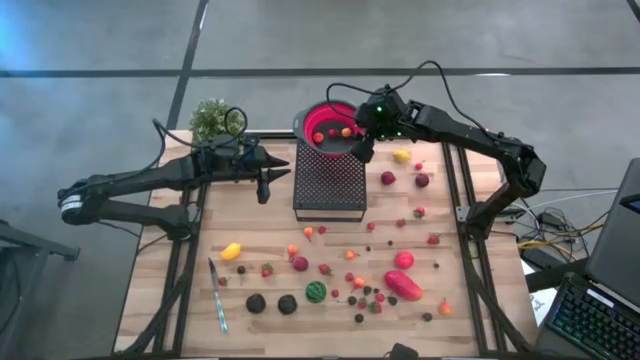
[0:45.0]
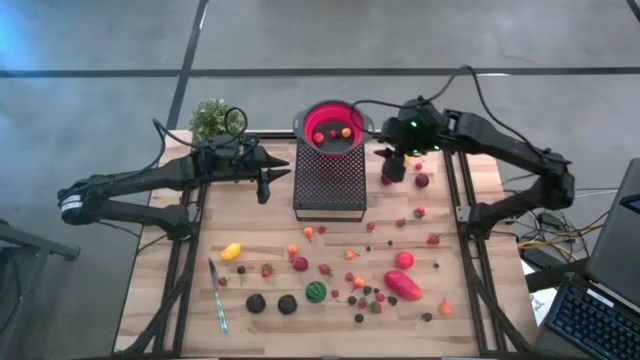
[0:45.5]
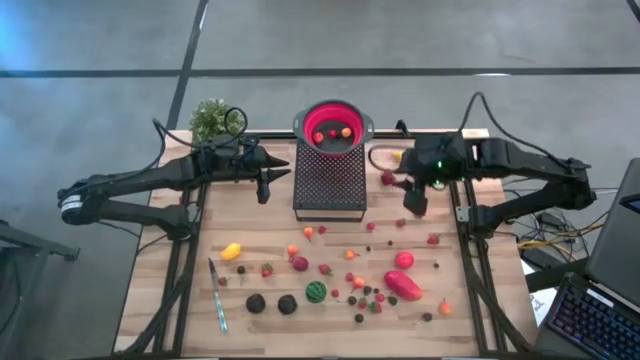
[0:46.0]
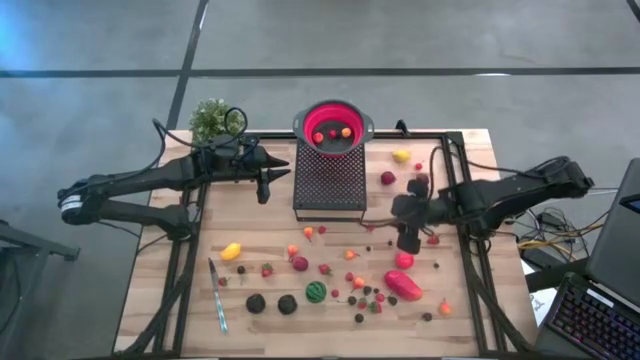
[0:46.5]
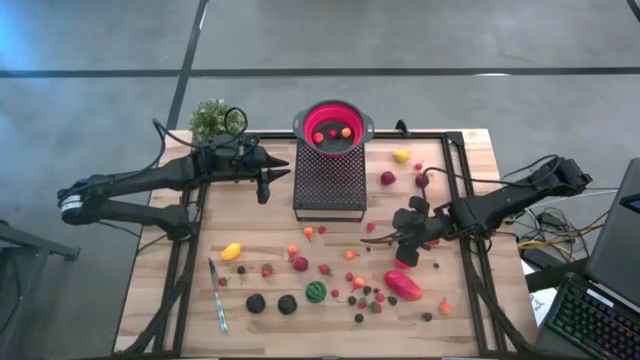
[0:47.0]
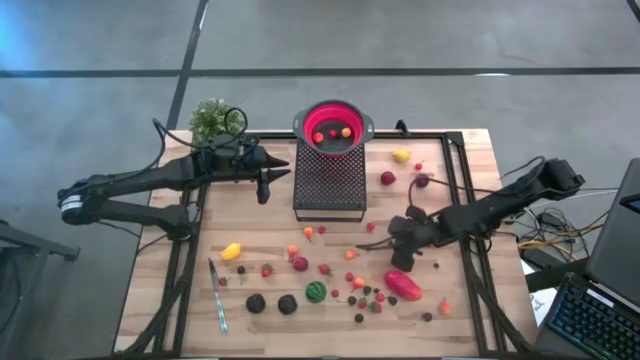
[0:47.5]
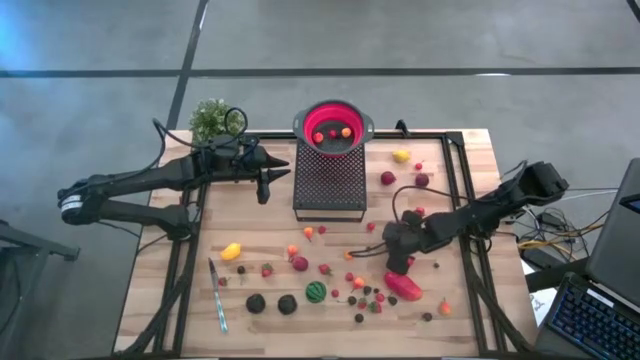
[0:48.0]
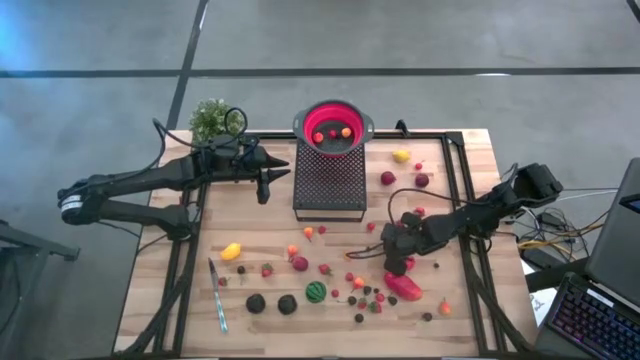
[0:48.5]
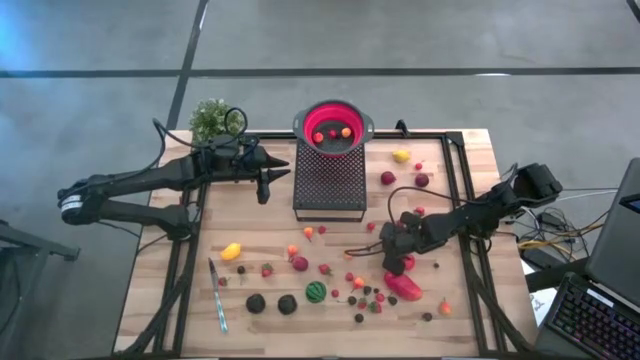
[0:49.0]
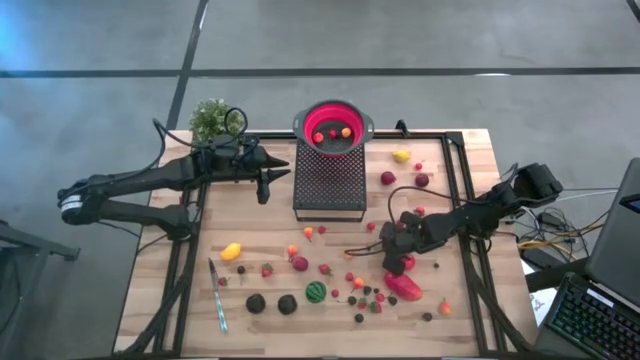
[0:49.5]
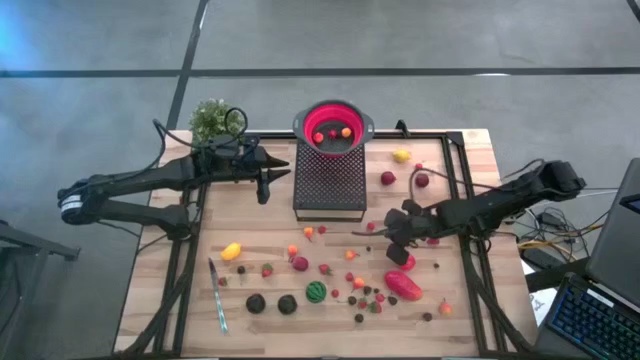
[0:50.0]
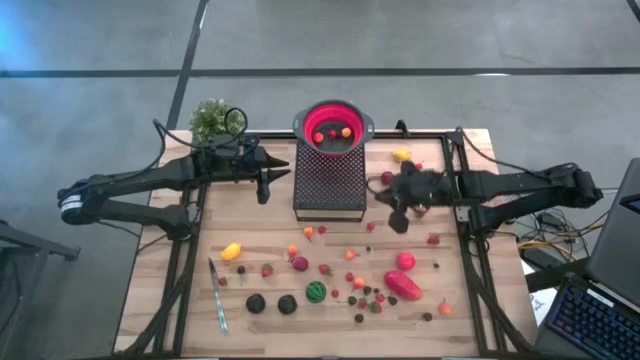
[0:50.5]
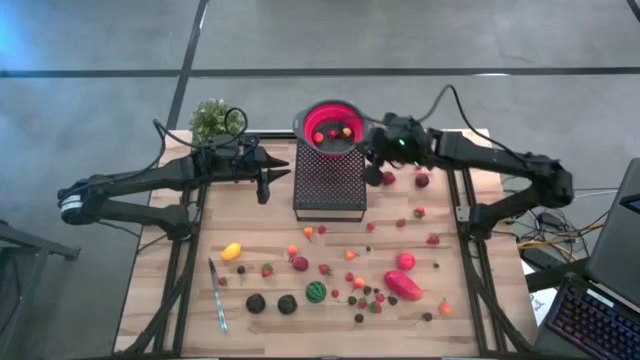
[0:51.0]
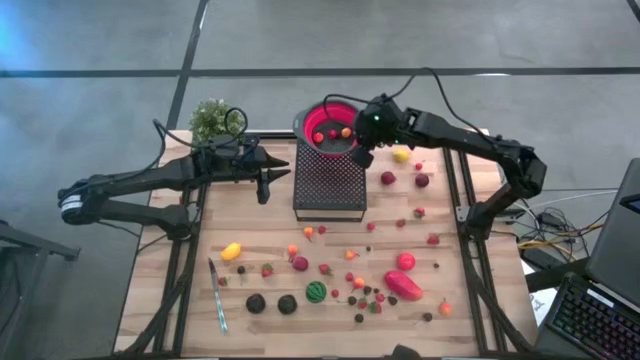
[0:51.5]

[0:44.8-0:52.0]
Task: Pick & Place Fruit
Put the blueberry into the red strainer bowl on the shelf

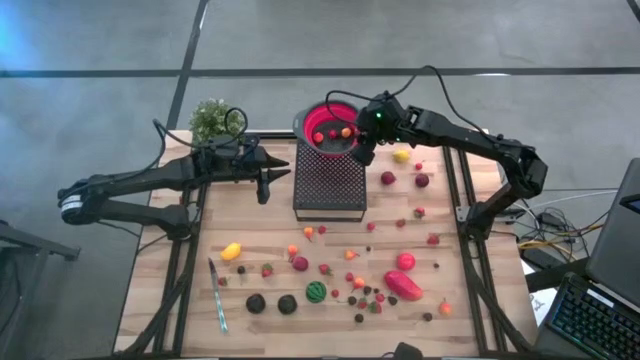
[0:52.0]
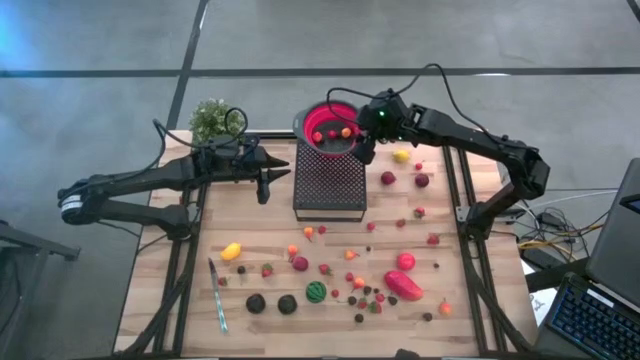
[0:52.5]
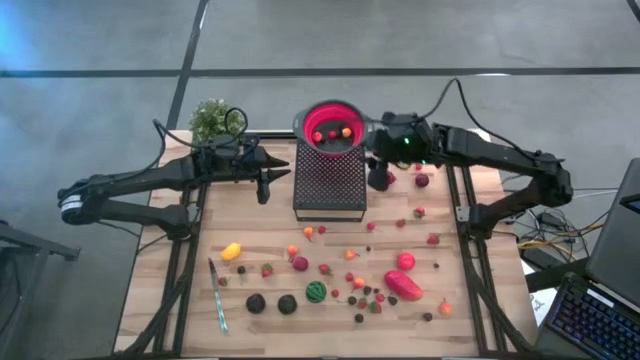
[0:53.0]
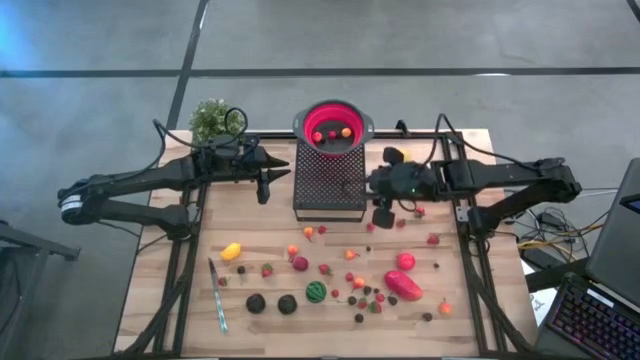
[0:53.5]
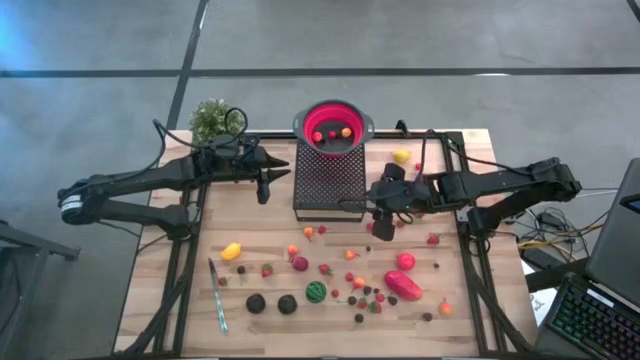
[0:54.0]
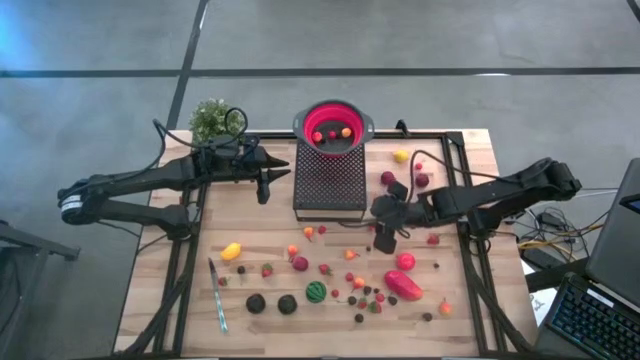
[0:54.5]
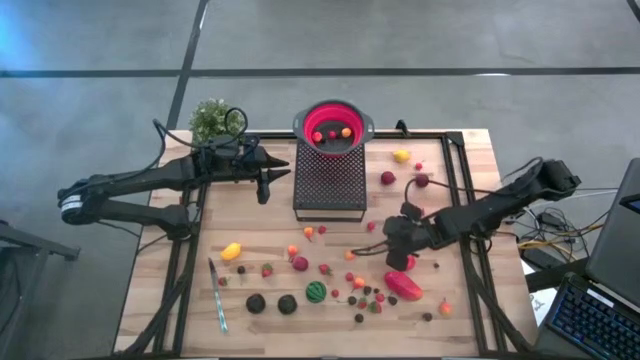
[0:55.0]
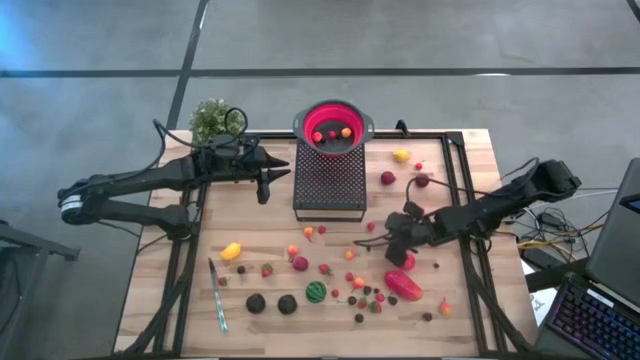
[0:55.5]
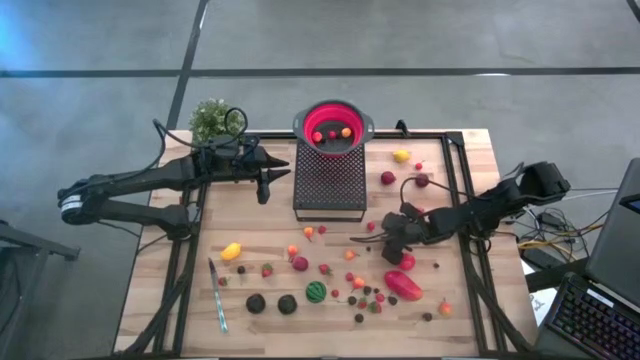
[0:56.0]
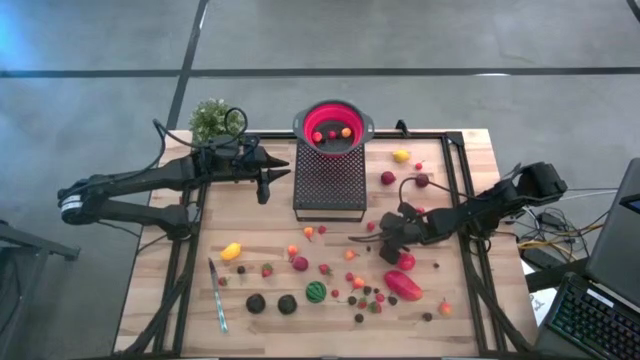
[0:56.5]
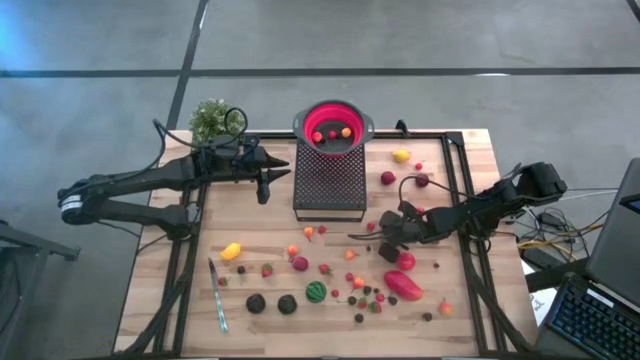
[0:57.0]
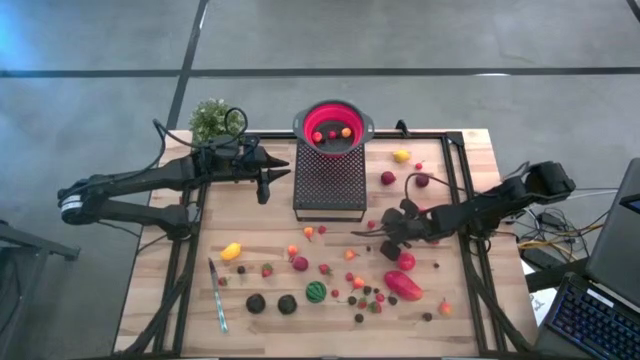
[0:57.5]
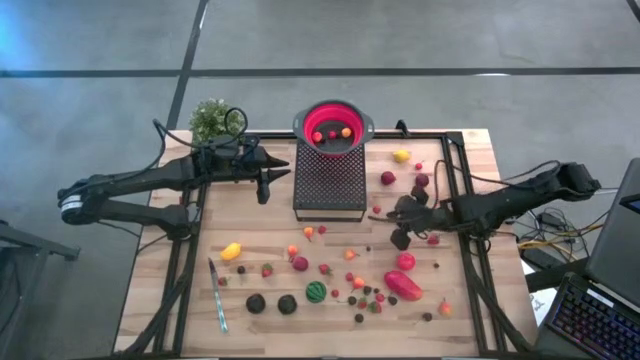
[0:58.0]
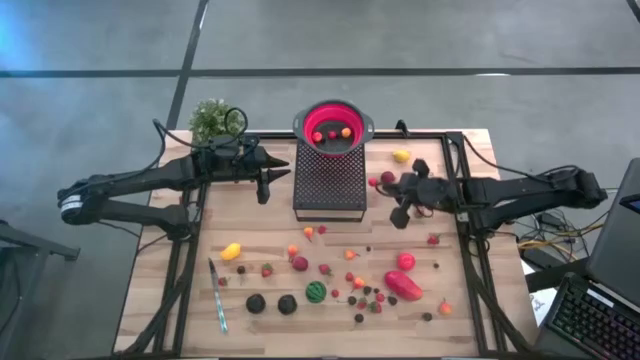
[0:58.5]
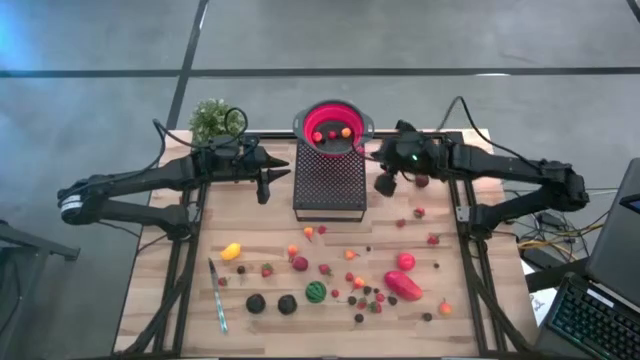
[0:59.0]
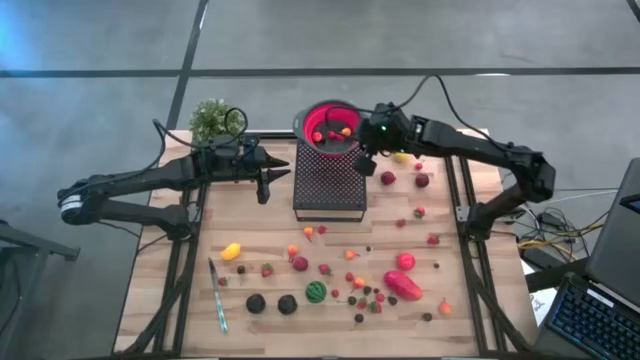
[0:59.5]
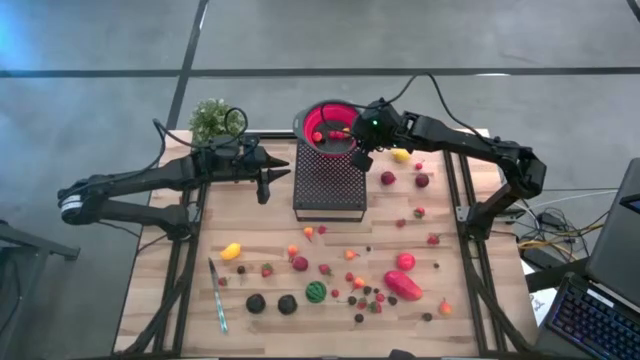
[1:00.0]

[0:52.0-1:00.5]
Put the red cherry into the red strainer bowl on the shelf

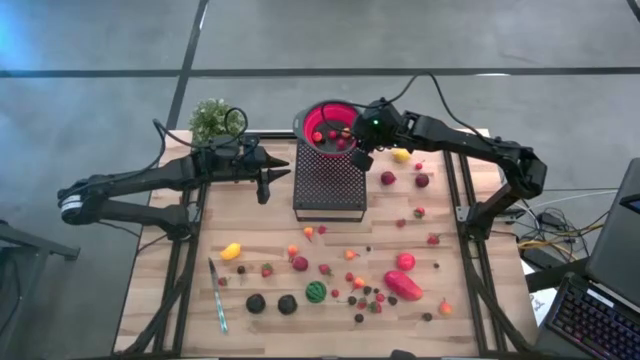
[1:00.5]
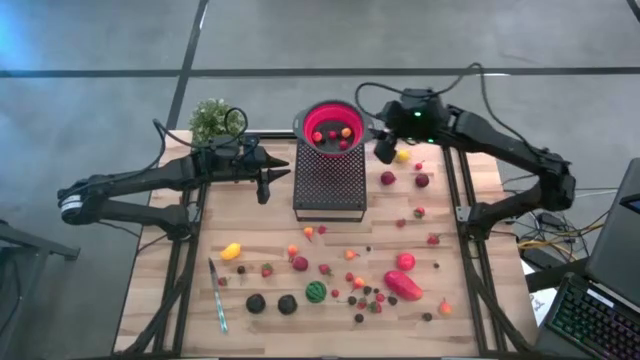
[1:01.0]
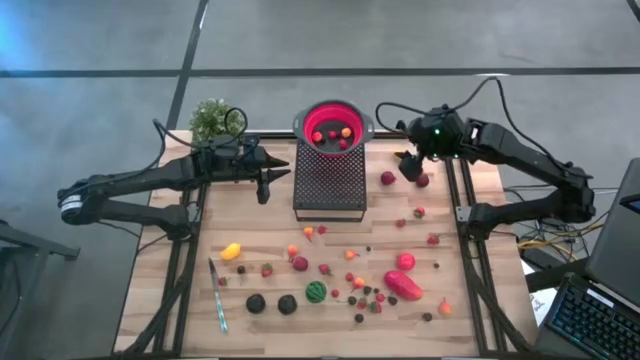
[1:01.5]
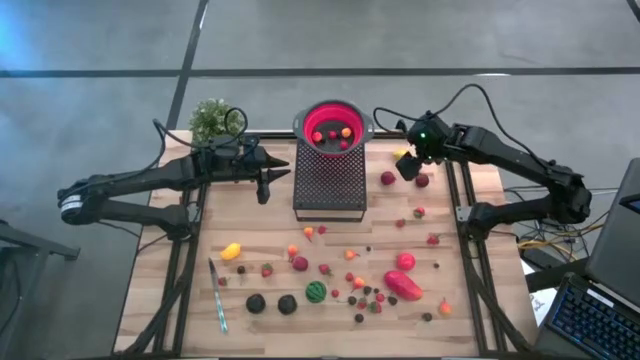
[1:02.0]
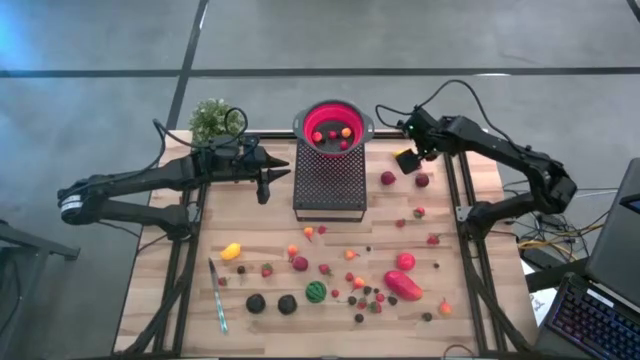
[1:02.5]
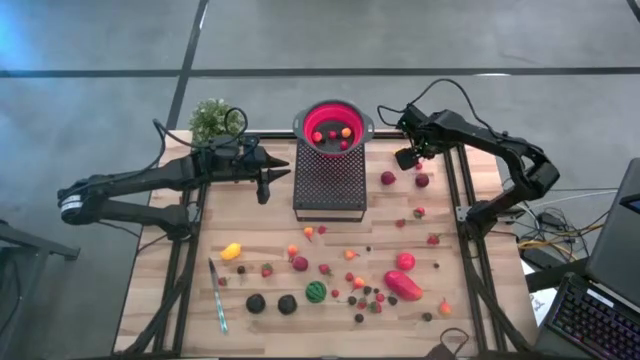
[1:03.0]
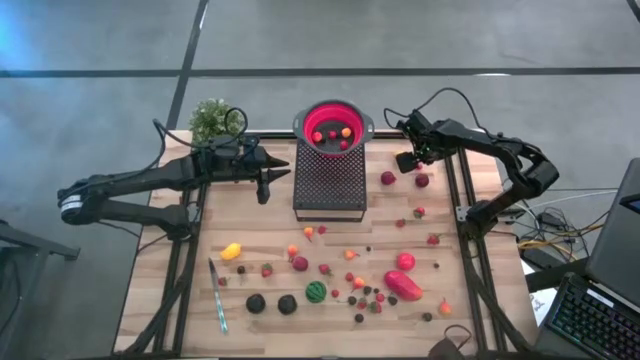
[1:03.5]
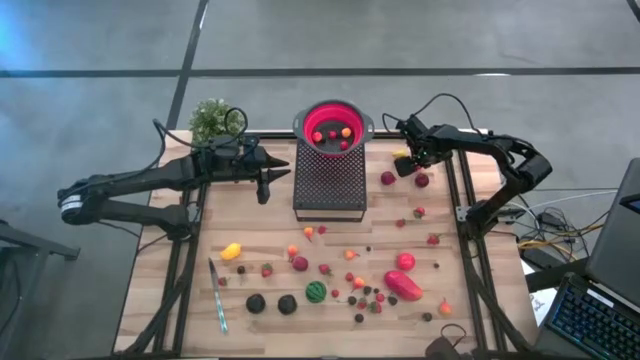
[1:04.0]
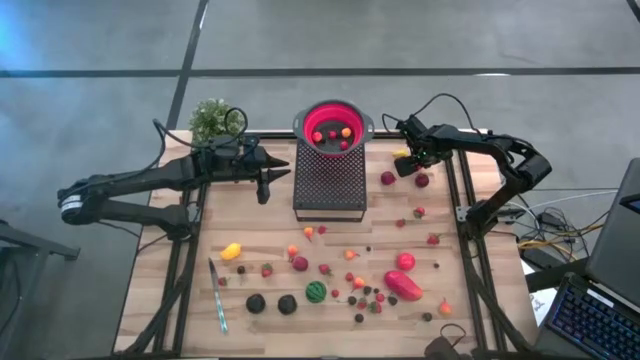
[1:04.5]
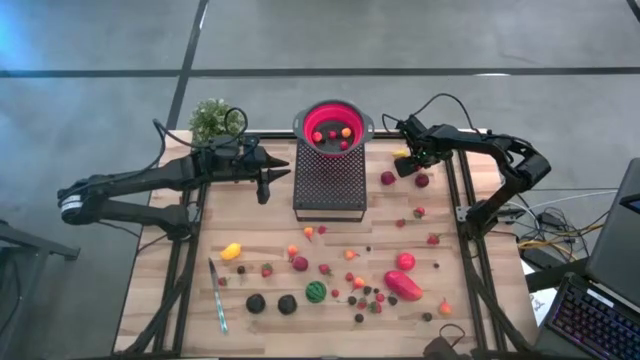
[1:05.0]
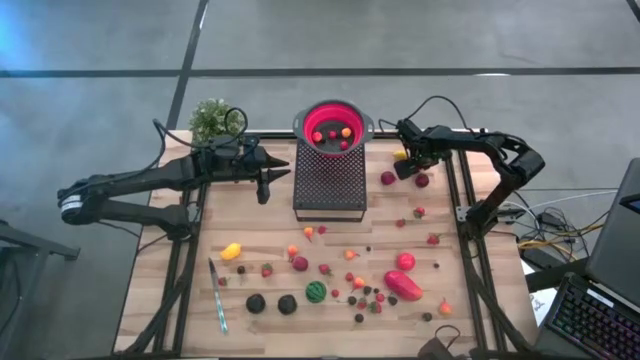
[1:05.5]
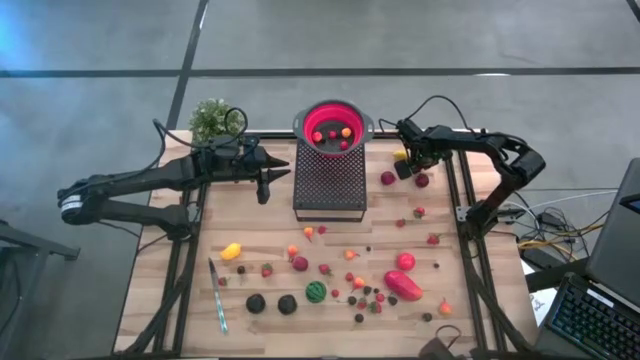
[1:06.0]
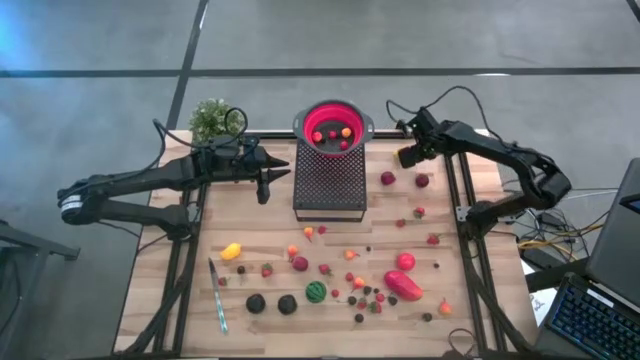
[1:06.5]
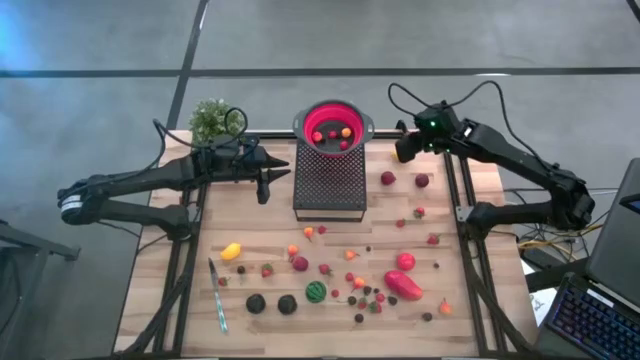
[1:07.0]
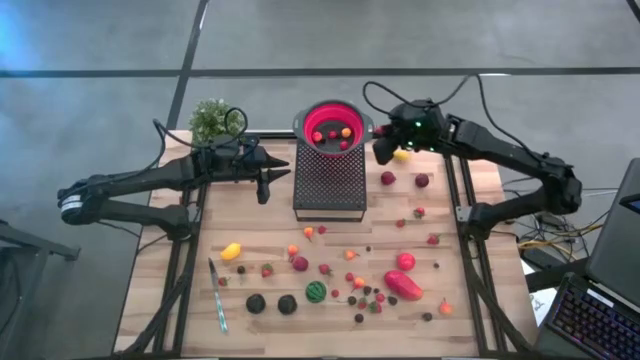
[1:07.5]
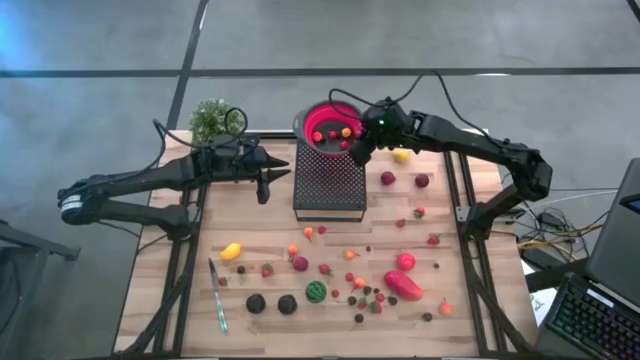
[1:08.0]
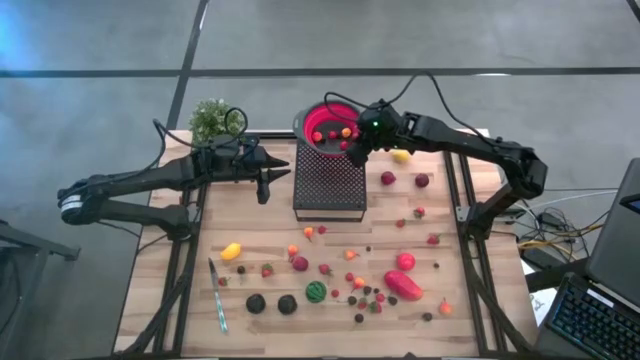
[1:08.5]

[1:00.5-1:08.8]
Put the red cherry into the red strainer bowl on the shelf
